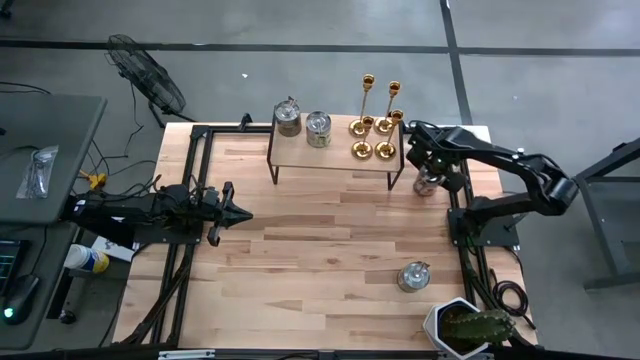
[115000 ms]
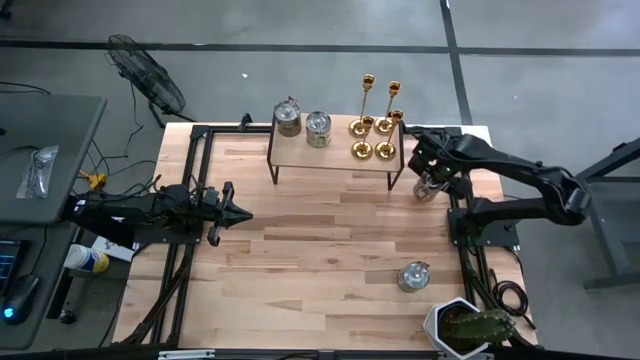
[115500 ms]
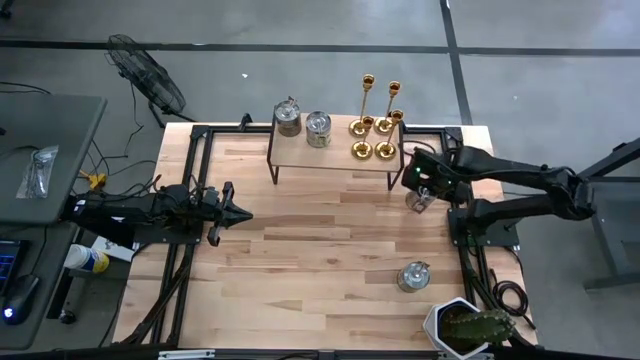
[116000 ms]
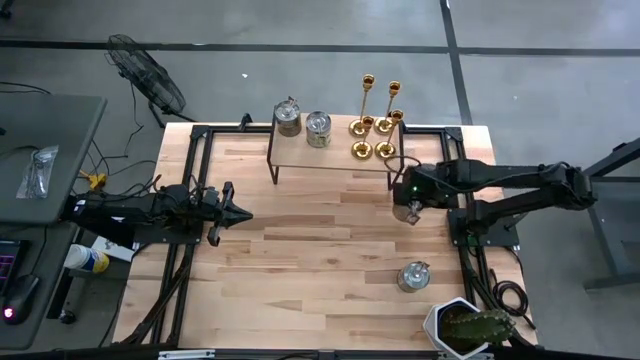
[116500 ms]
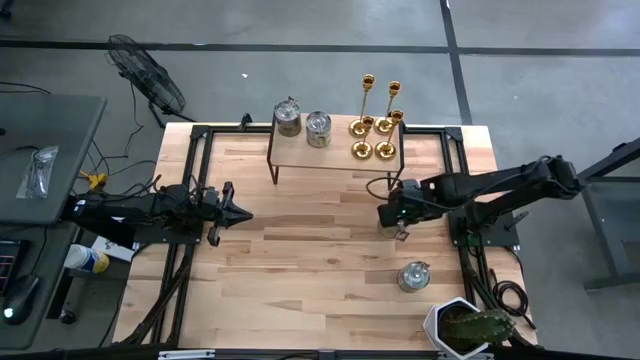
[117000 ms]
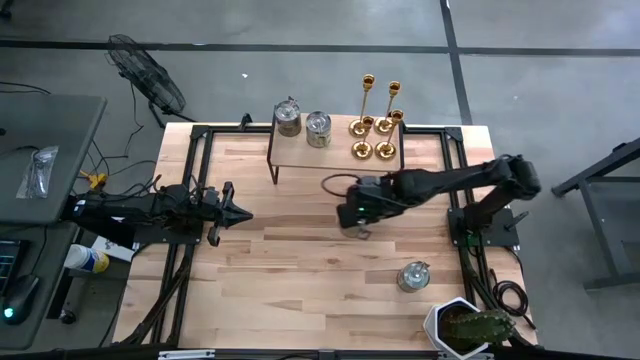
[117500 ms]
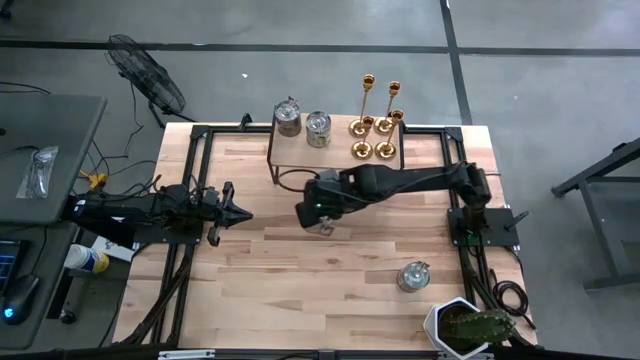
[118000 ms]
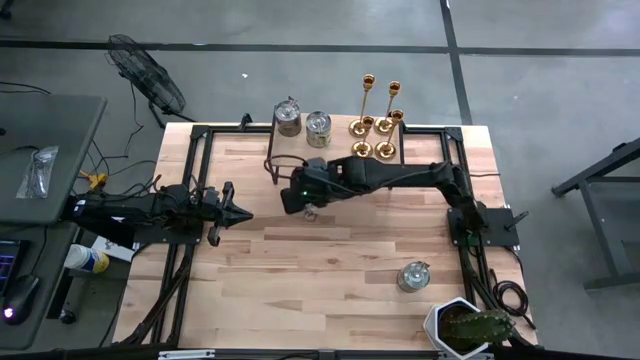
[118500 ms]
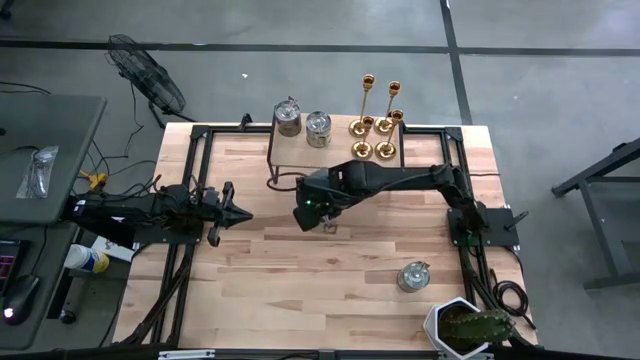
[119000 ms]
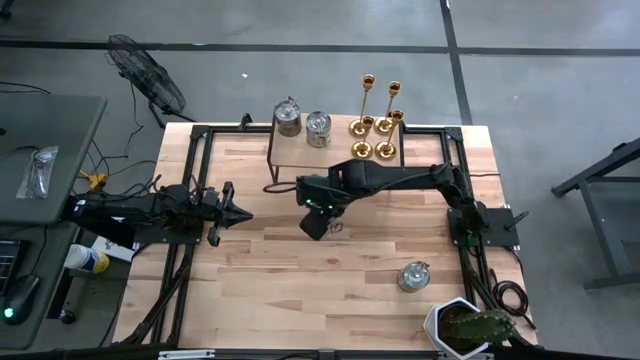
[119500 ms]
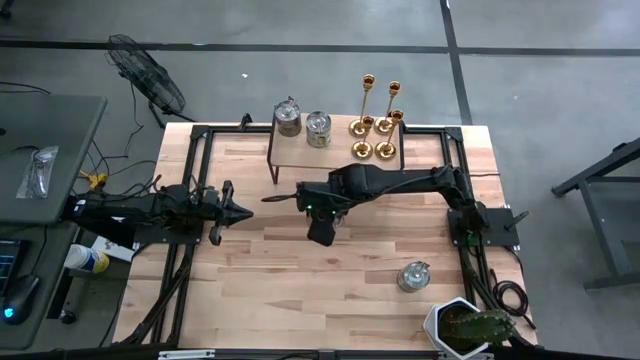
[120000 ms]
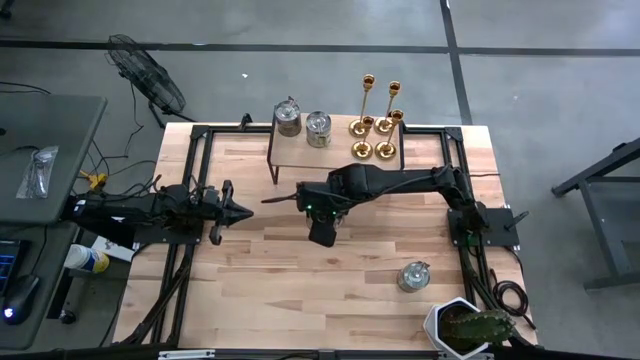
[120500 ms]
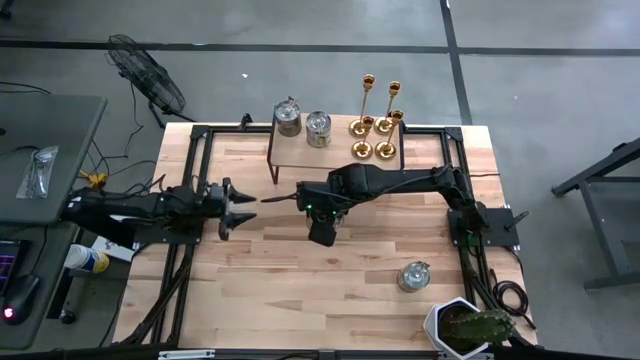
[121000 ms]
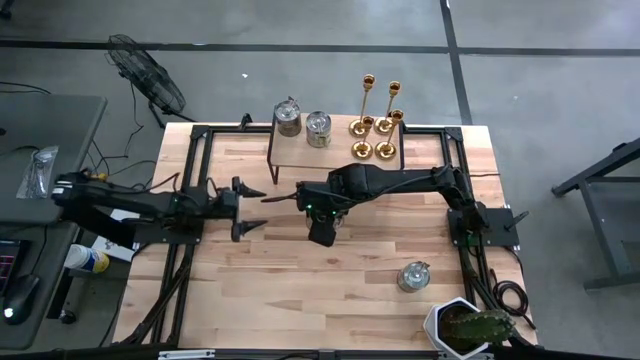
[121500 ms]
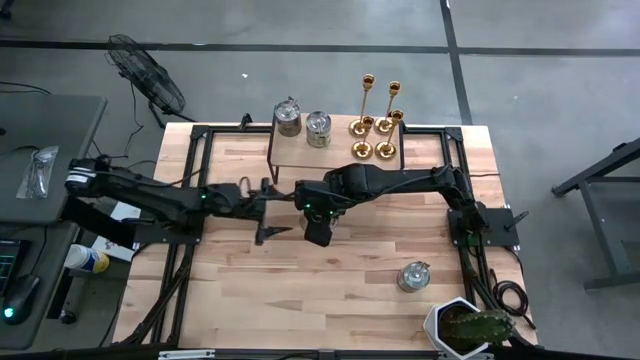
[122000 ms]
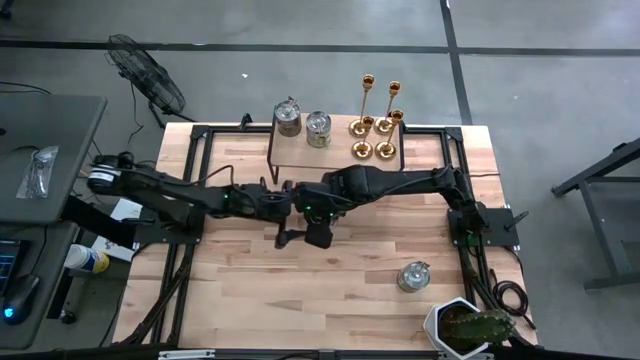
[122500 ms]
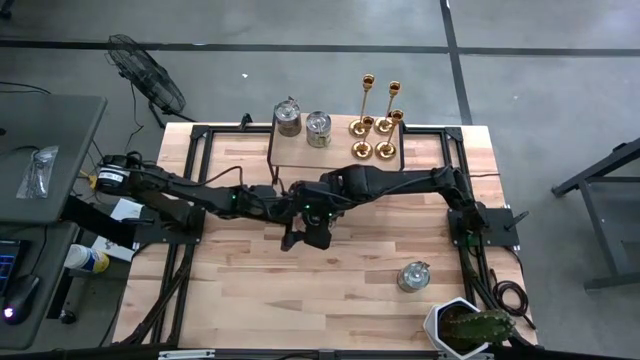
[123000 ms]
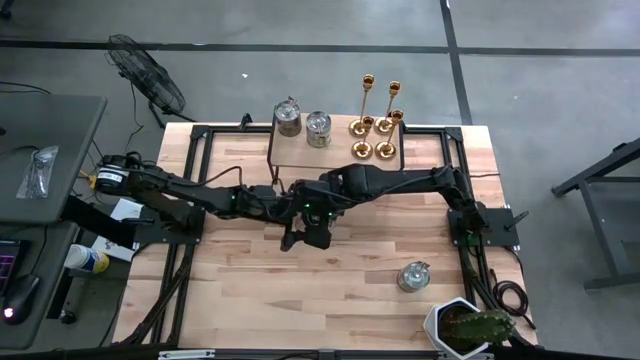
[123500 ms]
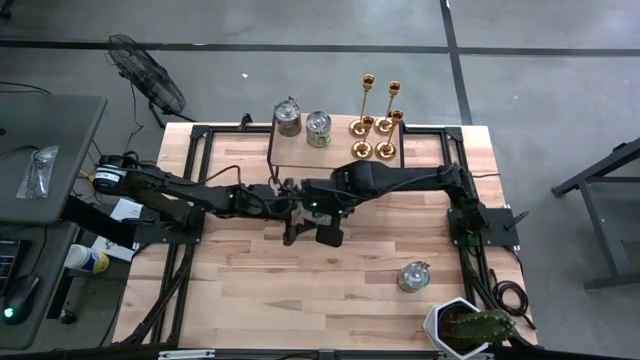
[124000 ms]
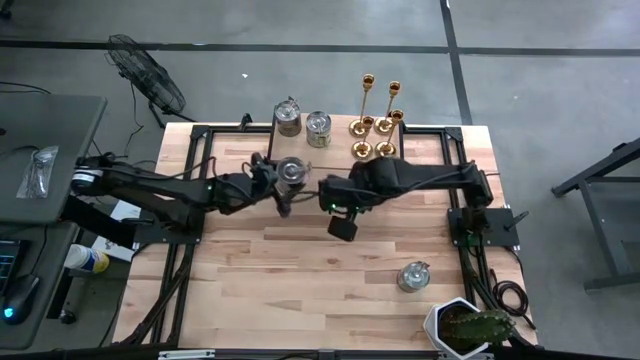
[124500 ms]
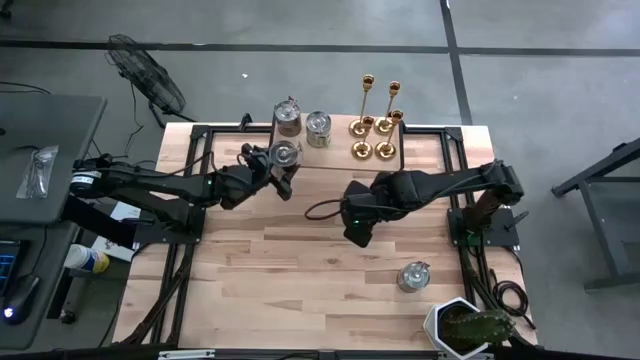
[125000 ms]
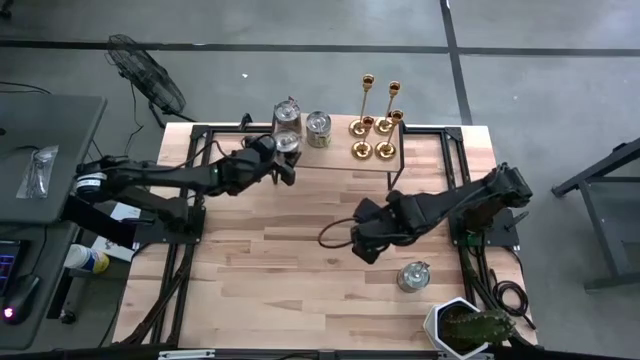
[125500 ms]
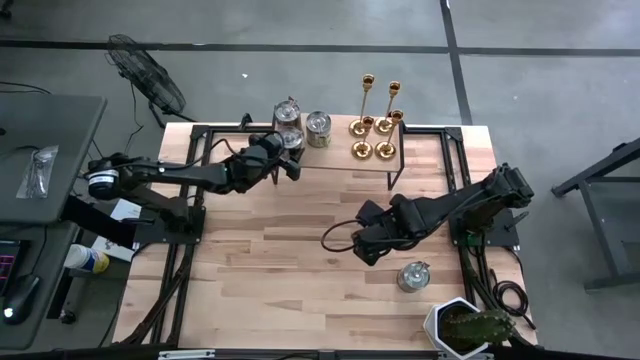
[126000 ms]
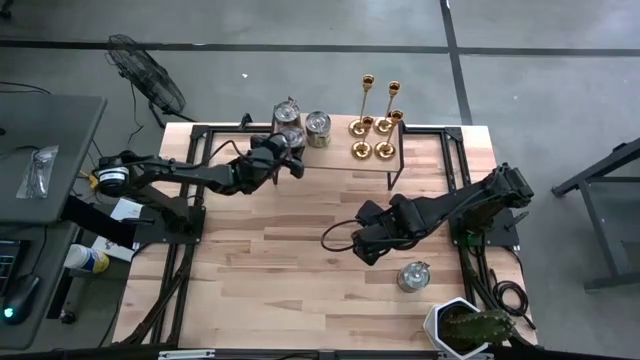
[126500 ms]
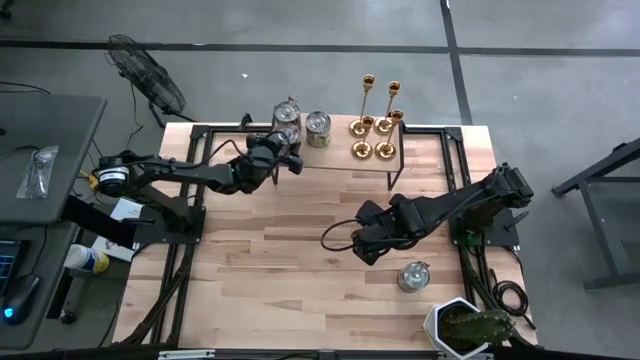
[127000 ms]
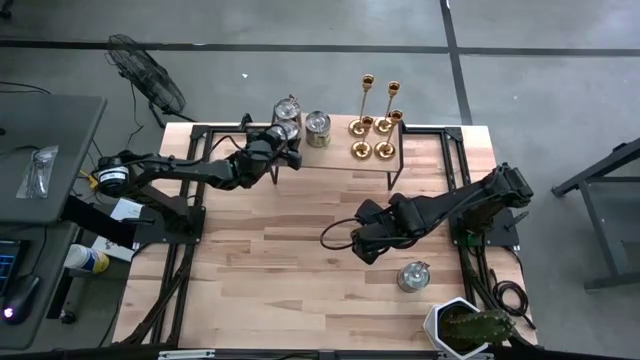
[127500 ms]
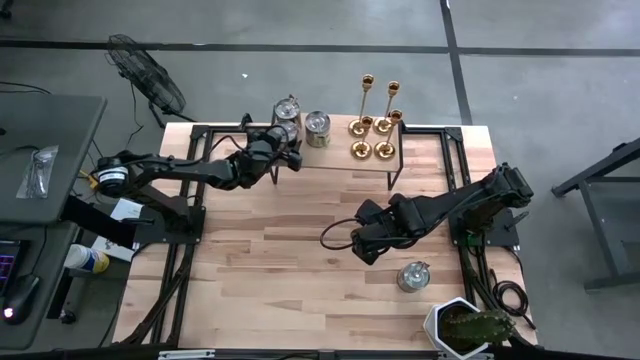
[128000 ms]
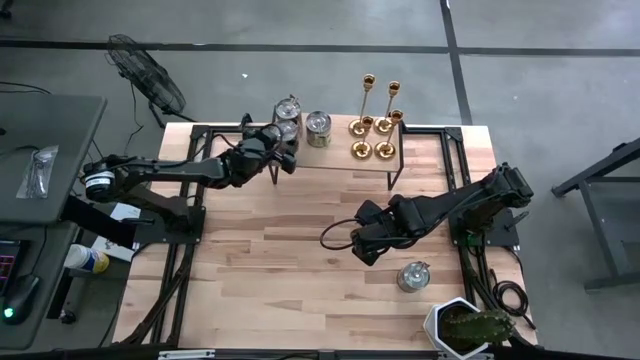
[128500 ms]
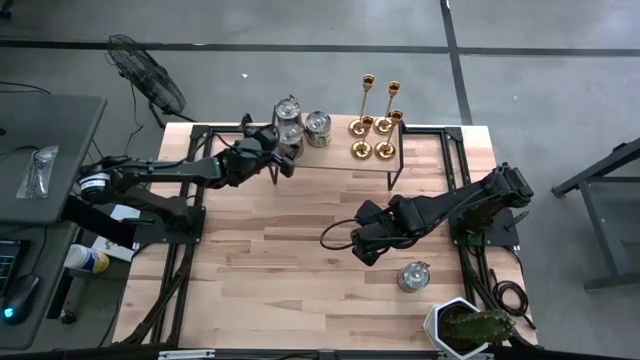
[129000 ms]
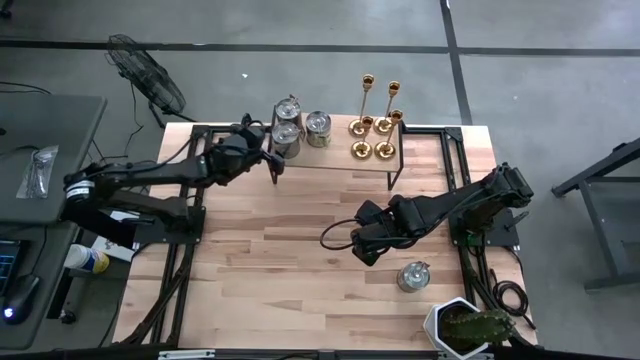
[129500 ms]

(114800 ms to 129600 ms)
Task: Pick & Place candle stick holders
Align the silver scented candle on the shelf with the silver scented candle

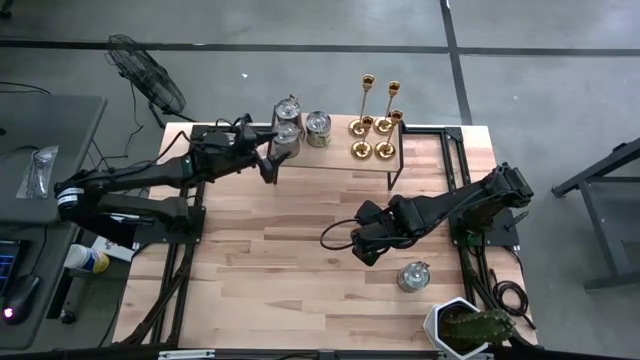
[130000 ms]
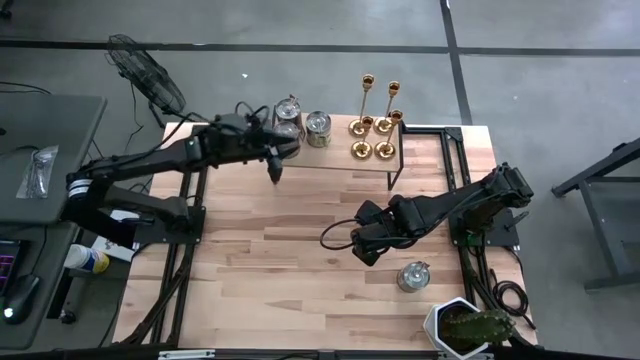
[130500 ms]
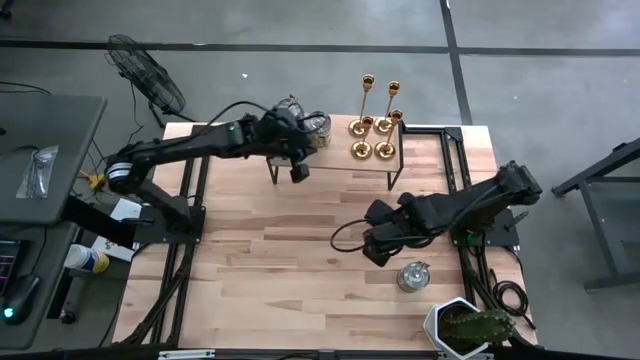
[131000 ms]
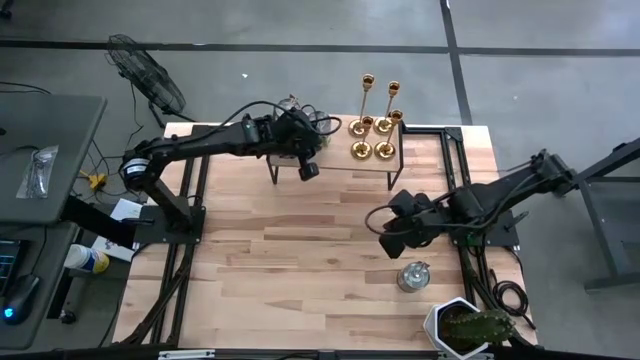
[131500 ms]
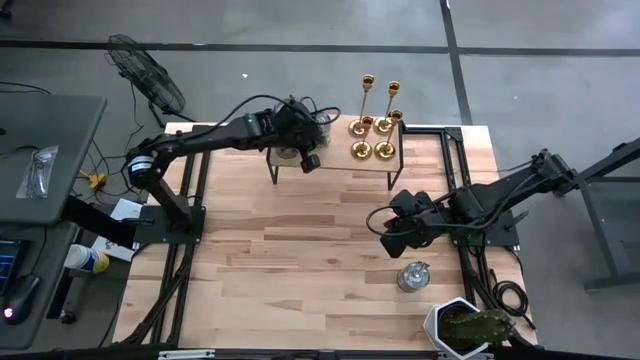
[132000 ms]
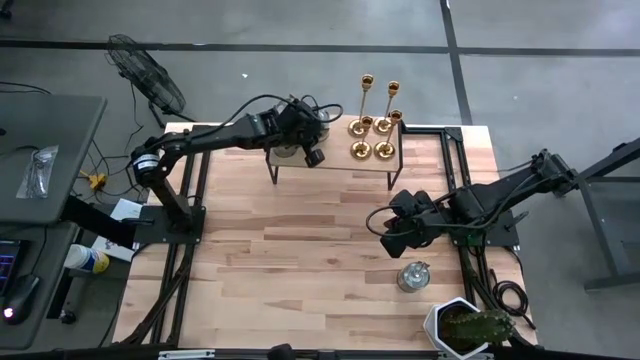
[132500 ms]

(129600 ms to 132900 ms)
Adjust the silver scented candle on the shelf

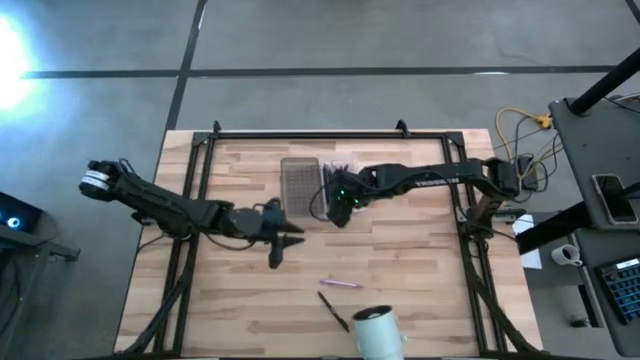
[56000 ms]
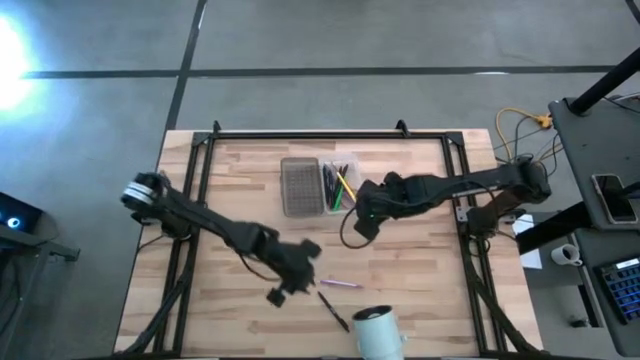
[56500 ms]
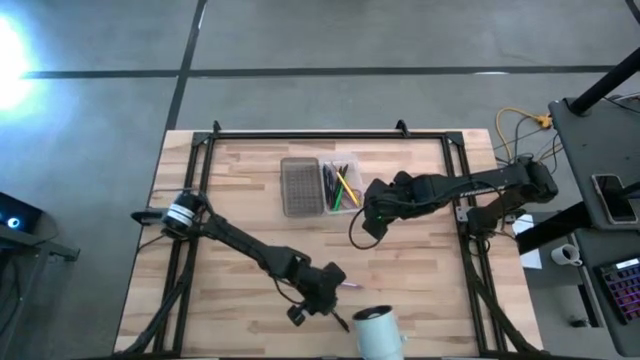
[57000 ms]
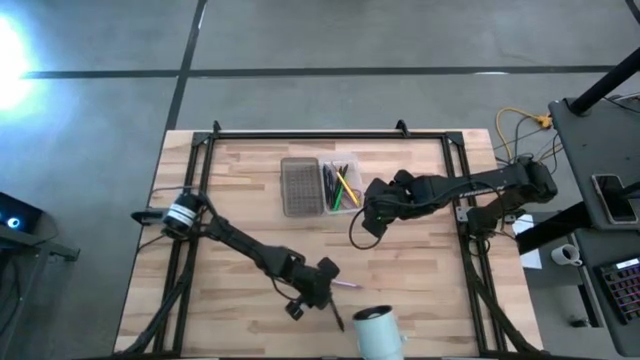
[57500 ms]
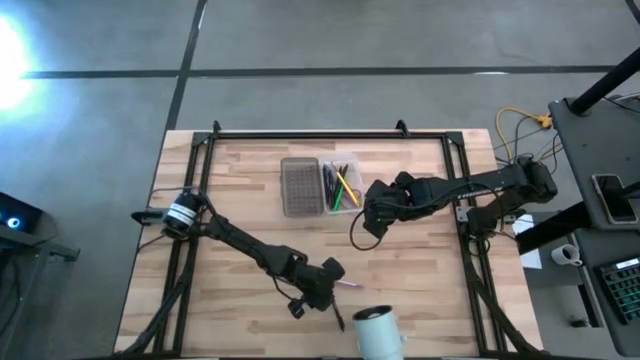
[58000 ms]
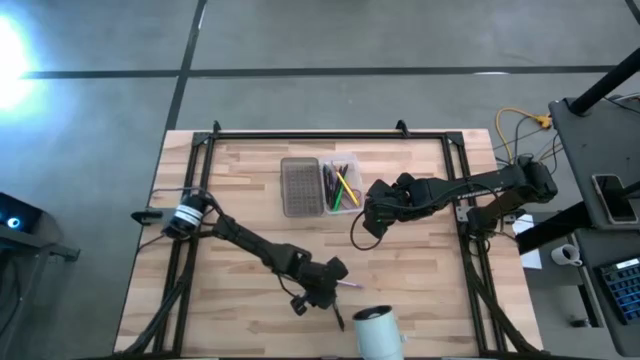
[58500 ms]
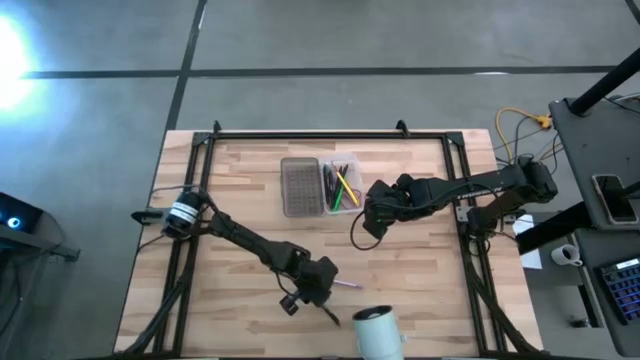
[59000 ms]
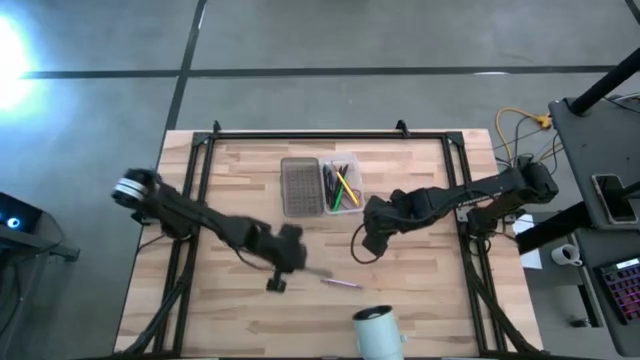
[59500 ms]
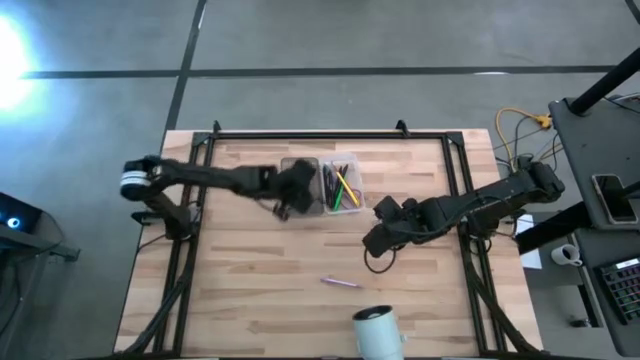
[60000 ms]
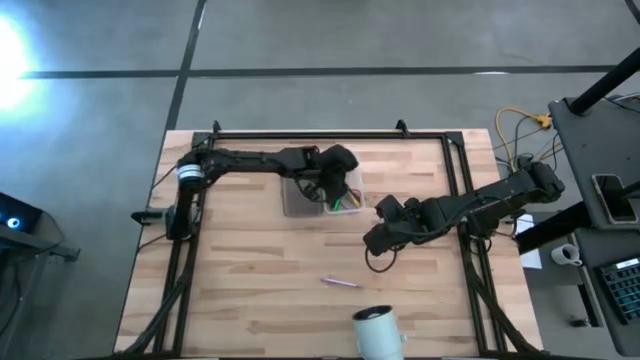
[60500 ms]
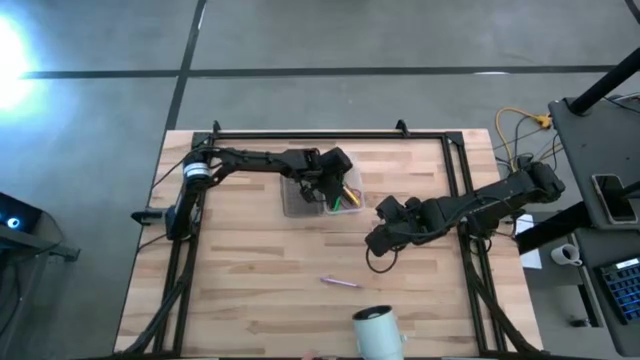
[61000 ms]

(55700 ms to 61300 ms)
Task: Pick & place school supplies into a supply box
Put the black pen into the gray supply box
